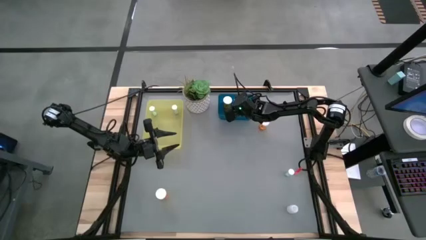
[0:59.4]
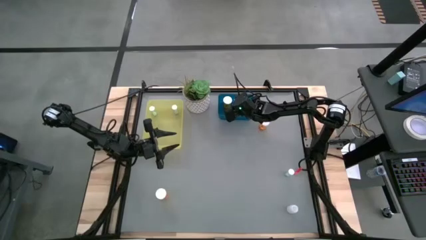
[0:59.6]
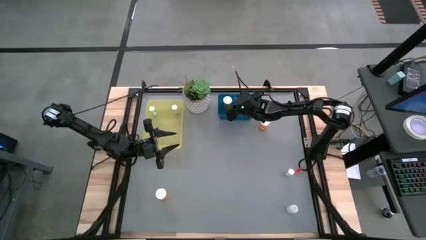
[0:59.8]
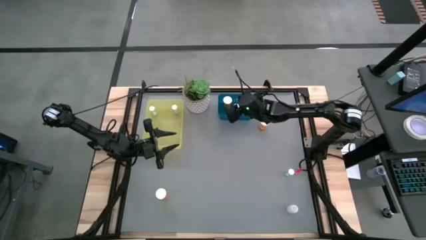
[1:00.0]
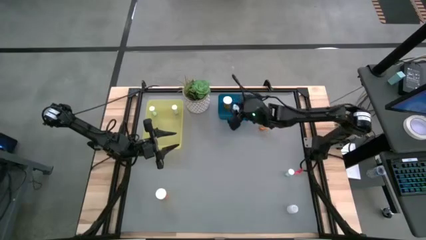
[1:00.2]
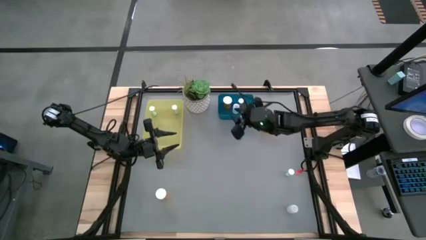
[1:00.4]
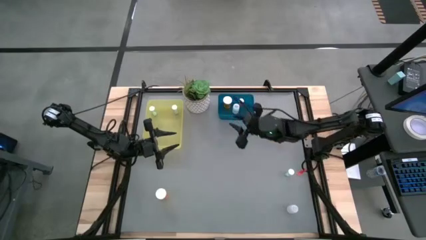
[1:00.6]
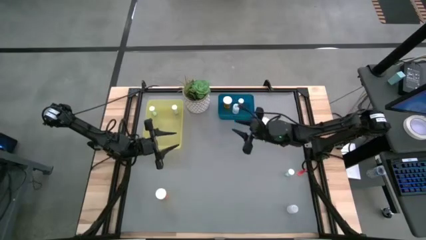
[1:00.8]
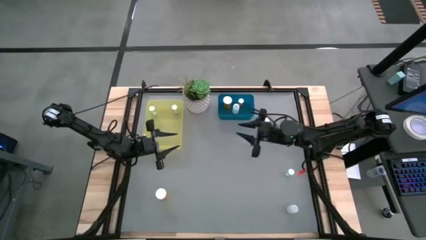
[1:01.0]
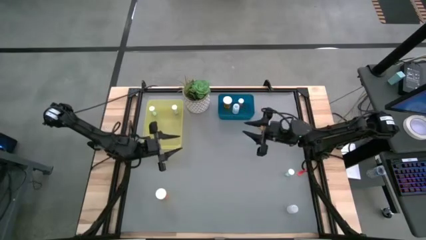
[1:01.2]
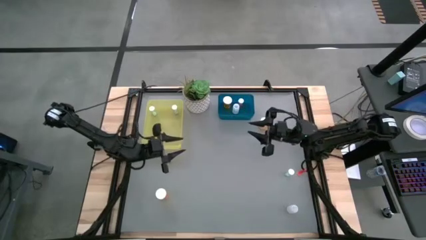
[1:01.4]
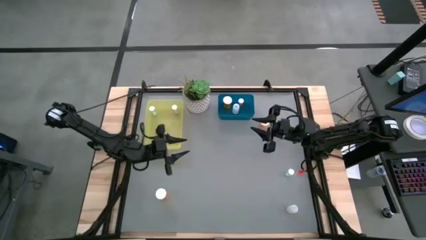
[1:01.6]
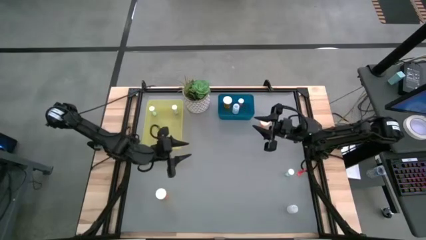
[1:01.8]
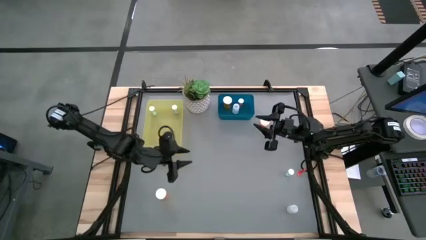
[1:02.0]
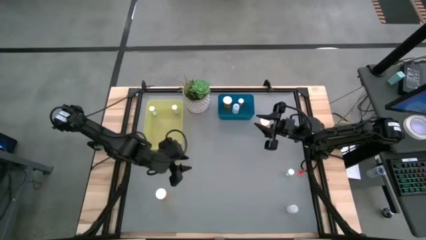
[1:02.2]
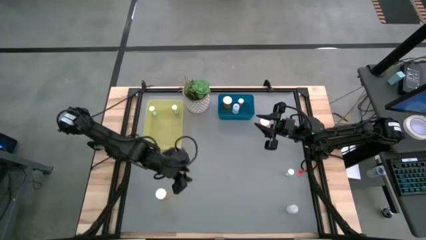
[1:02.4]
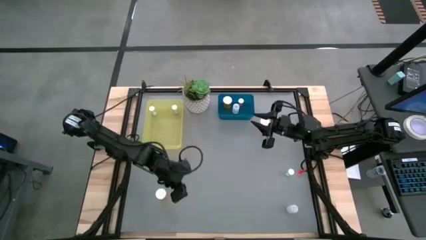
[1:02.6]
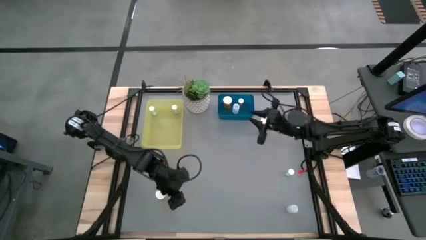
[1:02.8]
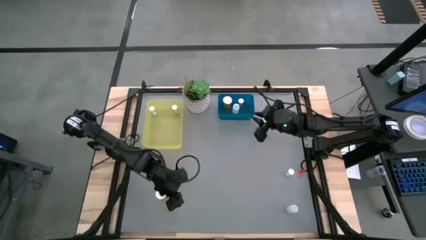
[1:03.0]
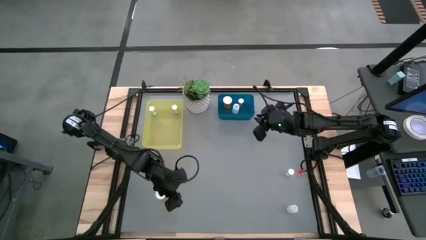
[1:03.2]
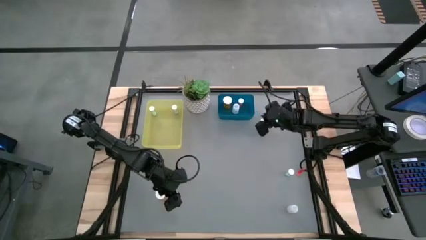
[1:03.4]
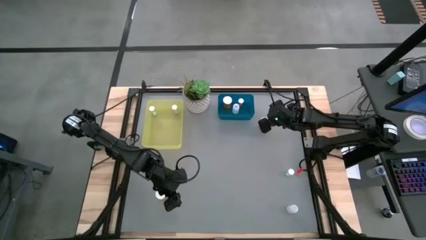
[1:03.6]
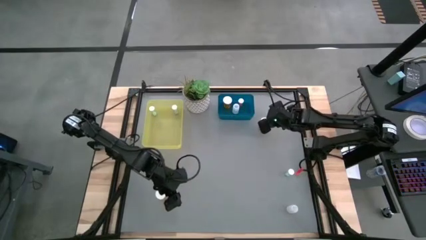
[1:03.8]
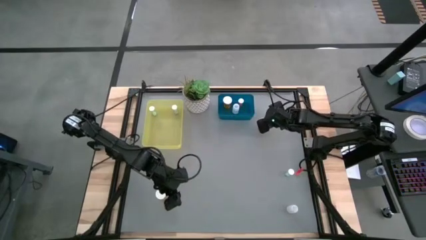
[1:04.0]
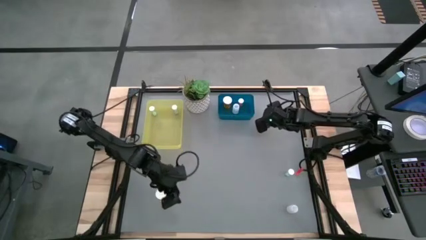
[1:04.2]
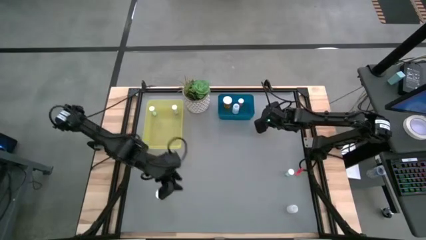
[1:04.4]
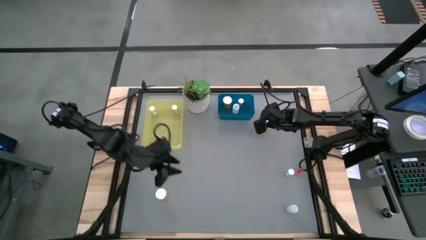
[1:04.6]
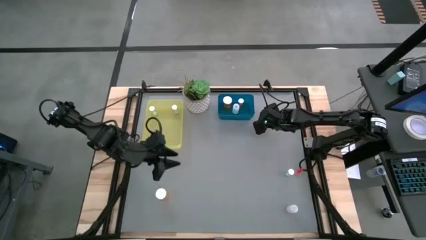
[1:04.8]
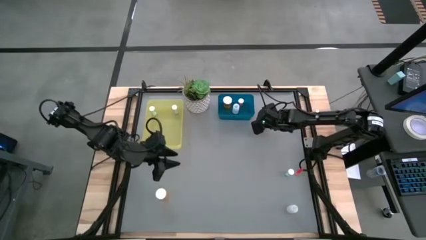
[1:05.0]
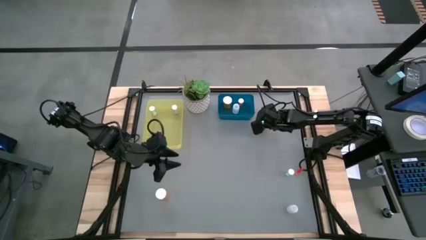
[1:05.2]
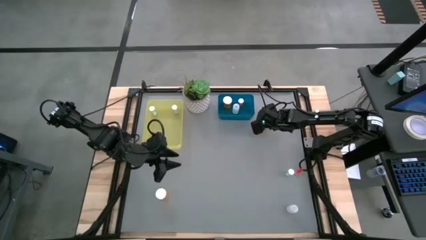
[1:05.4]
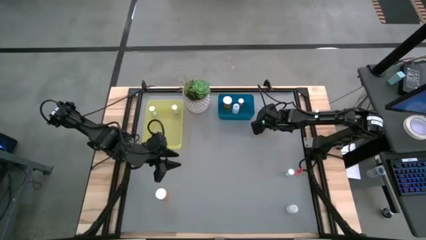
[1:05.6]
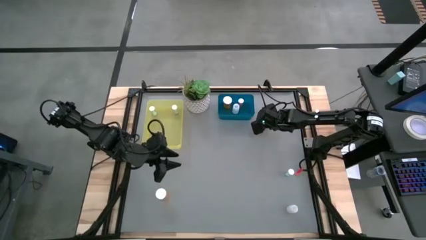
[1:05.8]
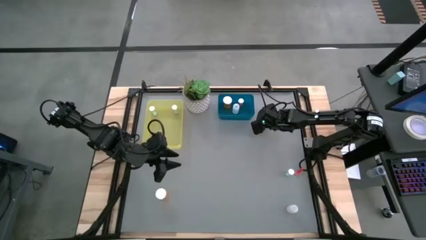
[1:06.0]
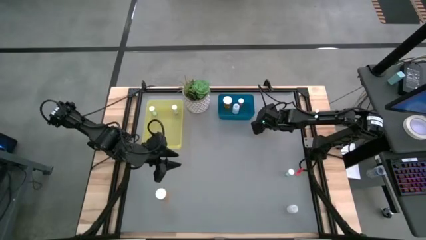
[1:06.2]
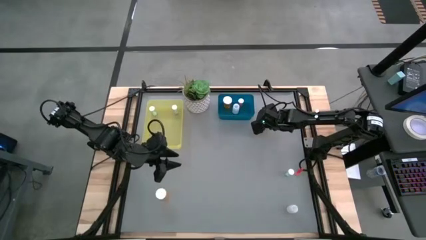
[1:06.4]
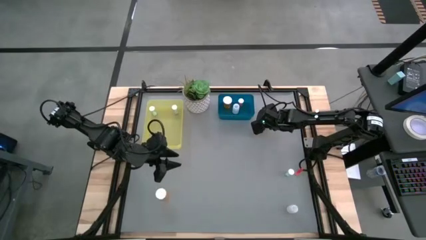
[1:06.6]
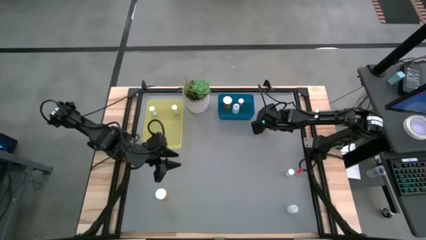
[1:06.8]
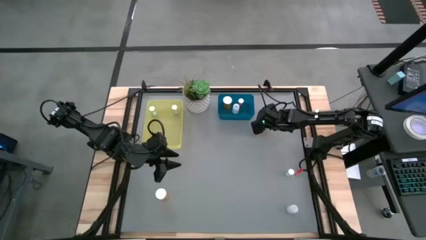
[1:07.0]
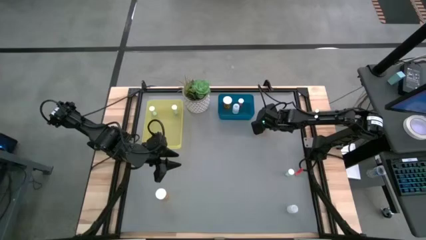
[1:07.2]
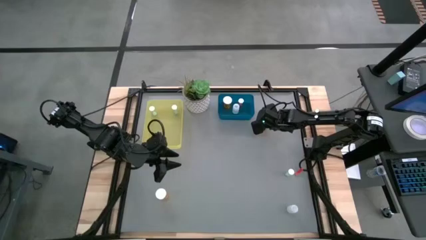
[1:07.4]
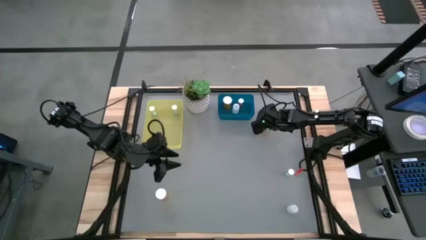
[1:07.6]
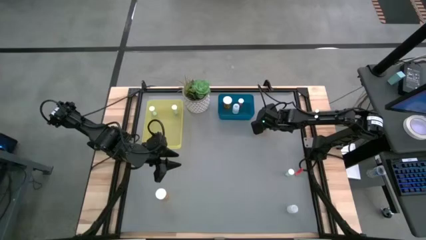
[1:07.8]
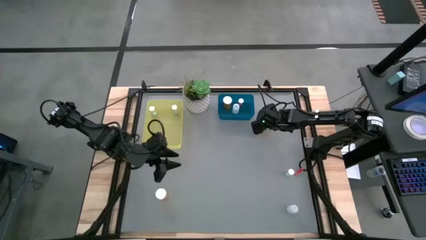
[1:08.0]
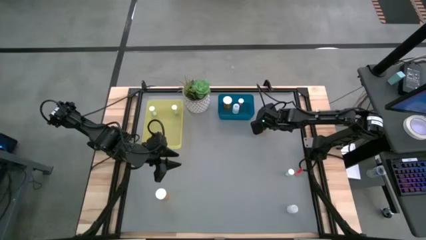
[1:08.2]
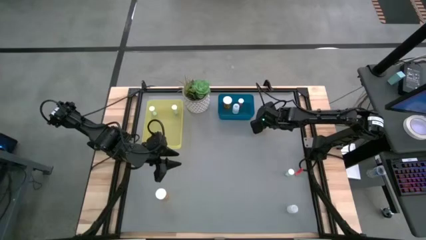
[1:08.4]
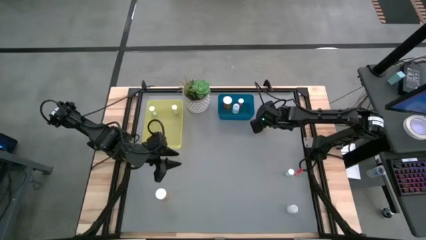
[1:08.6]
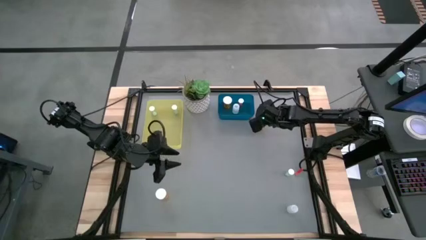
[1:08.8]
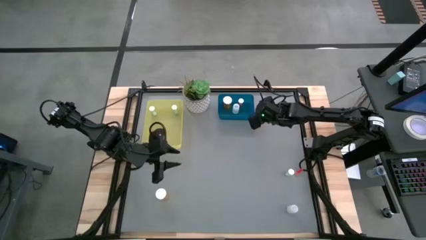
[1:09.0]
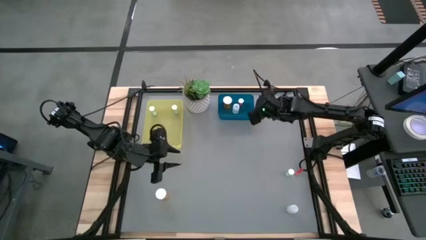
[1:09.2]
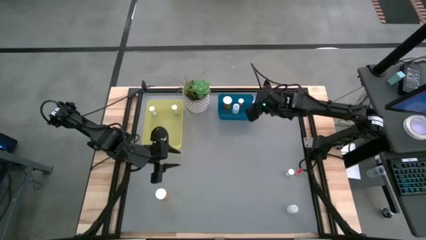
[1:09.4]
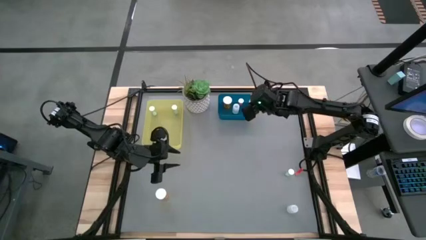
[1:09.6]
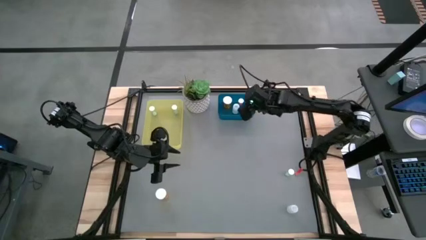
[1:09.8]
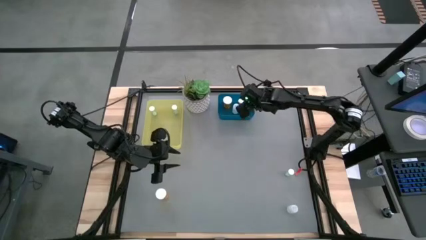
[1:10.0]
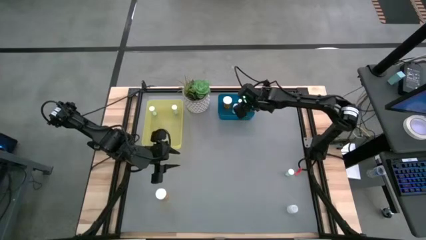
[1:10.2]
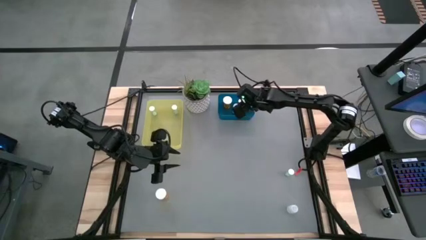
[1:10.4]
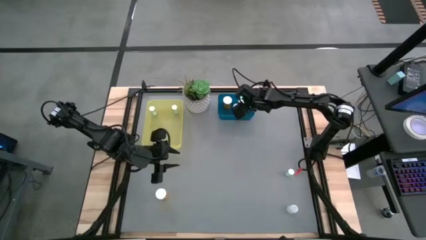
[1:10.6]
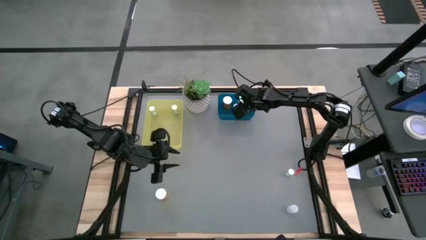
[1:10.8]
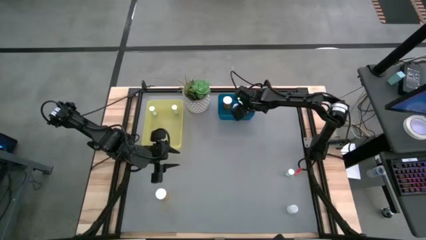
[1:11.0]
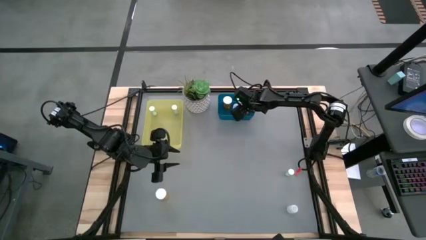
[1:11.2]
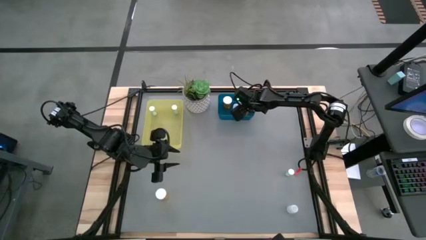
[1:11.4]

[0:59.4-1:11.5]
Task: Pick and place medicine bottles into bin by pill shape (circle, oval)
Put the orange capsule bottle into the blue bin

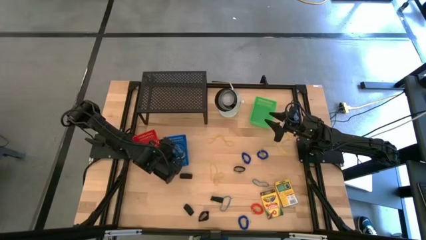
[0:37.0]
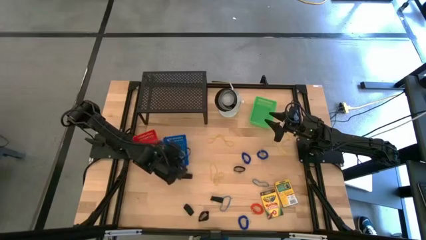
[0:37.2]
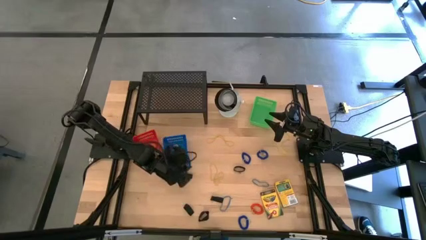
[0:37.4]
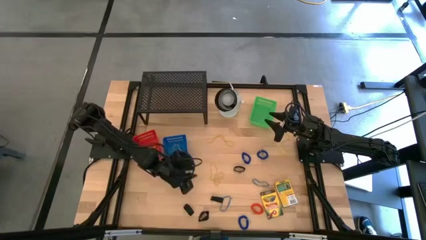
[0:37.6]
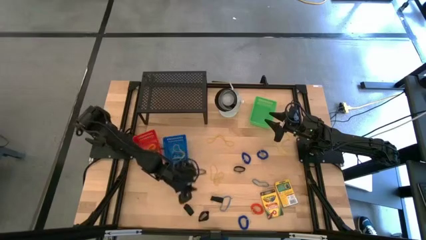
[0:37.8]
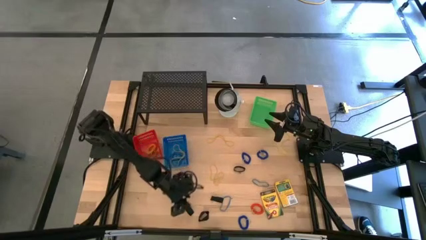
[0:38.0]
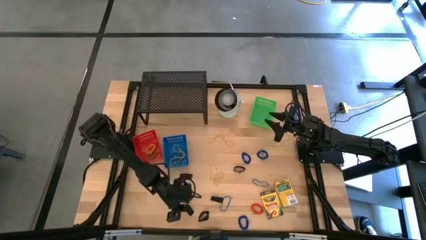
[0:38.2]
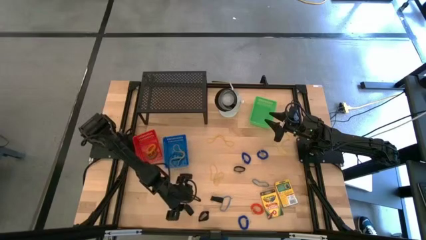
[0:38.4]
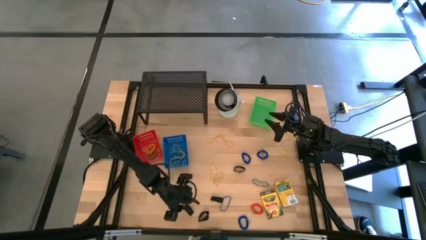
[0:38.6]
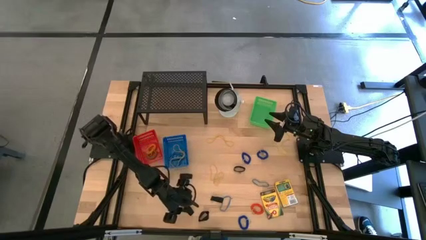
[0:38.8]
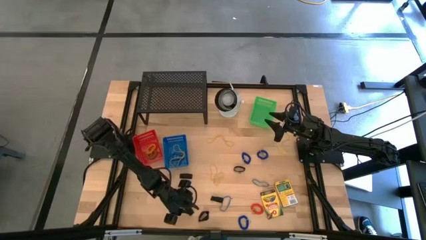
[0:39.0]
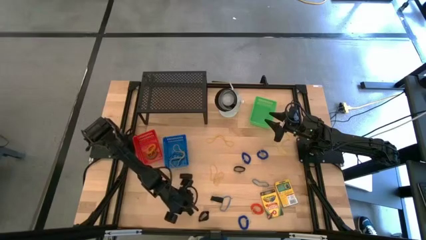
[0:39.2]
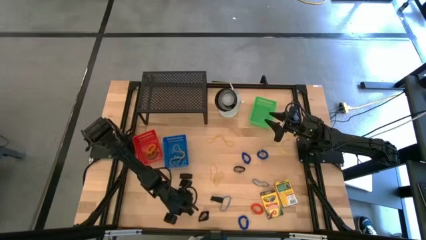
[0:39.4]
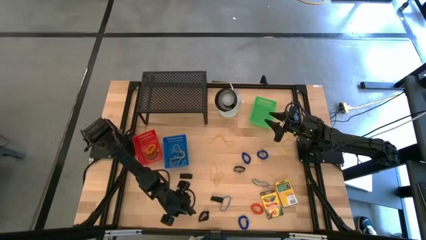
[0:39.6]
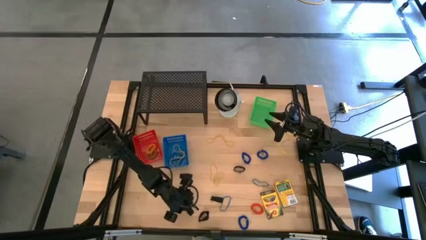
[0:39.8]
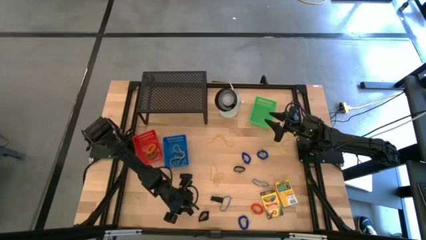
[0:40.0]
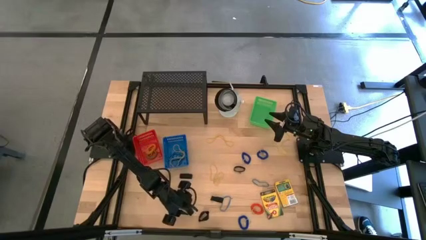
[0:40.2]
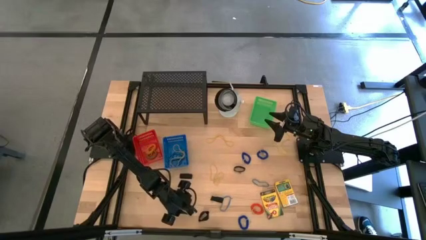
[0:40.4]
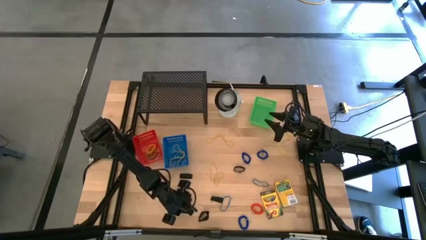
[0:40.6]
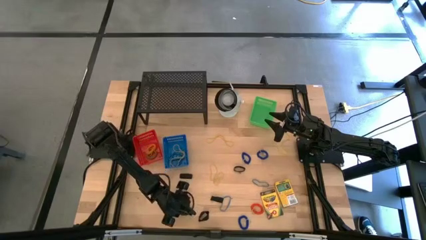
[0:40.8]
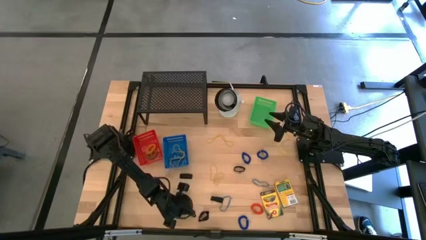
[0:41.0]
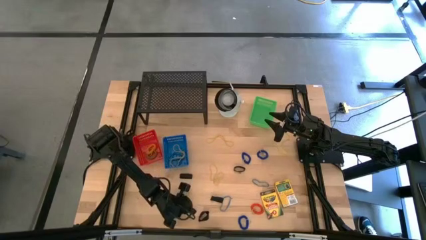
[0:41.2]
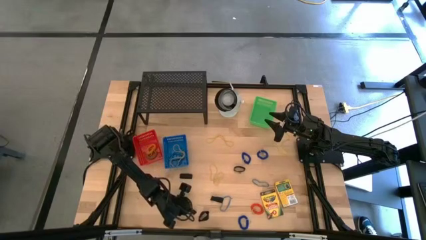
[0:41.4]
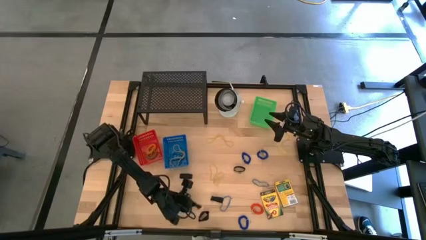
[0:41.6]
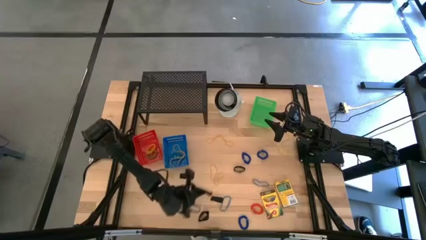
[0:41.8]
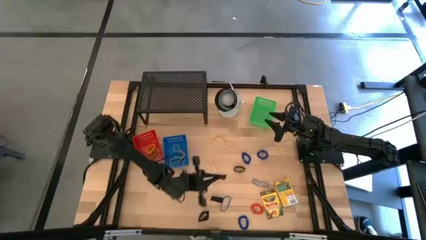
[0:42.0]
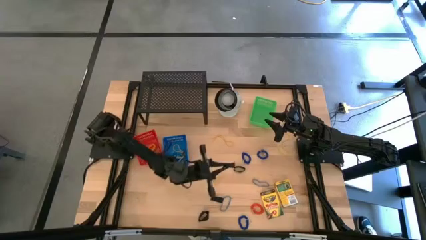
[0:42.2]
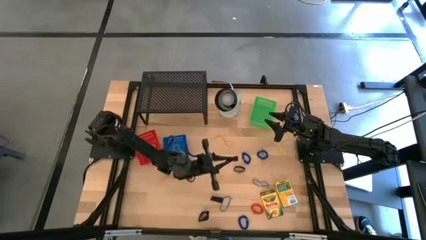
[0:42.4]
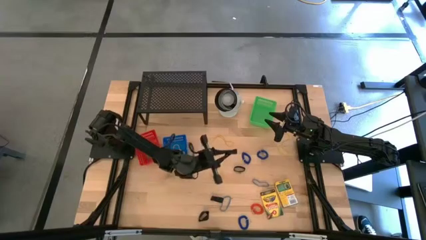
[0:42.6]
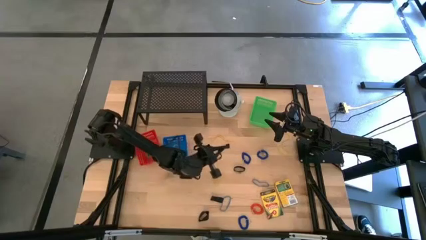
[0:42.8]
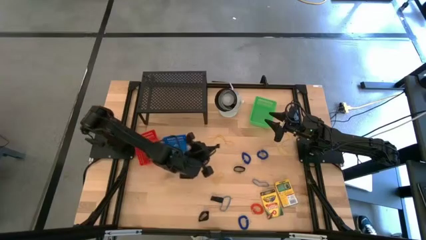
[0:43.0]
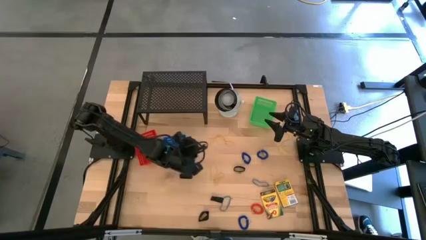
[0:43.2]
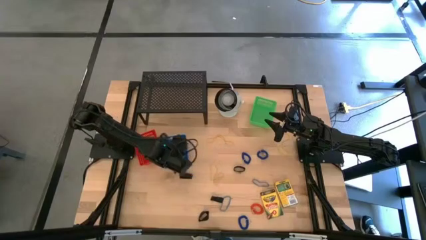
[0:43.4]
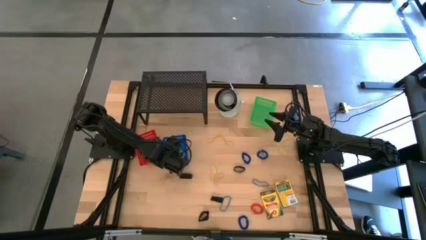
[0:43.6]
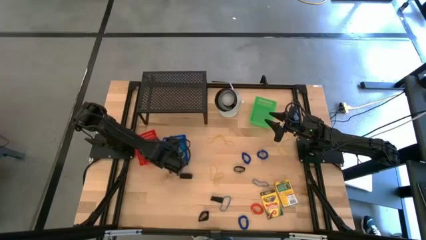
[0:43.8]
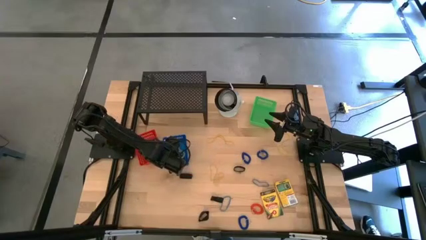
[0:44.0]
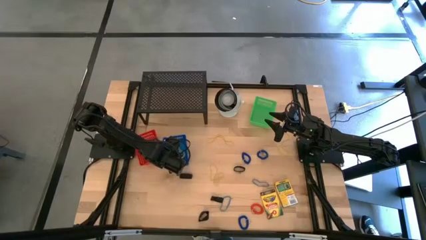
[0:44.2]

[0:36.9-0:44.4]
Task: Pick & Place Office Desk Supplies
Put the black rubber band into the blue bin
